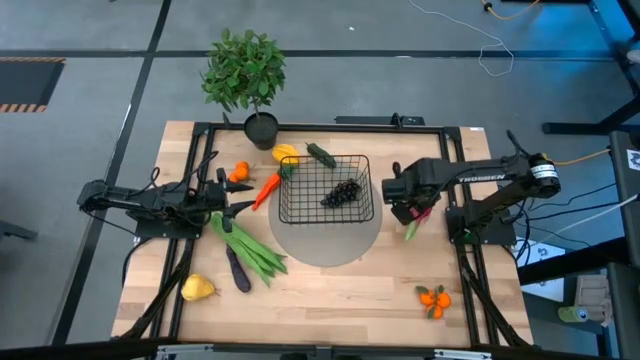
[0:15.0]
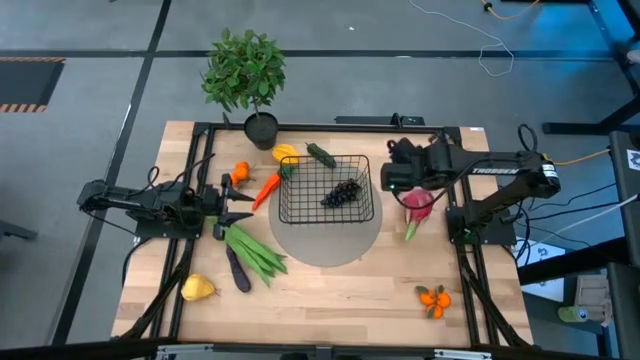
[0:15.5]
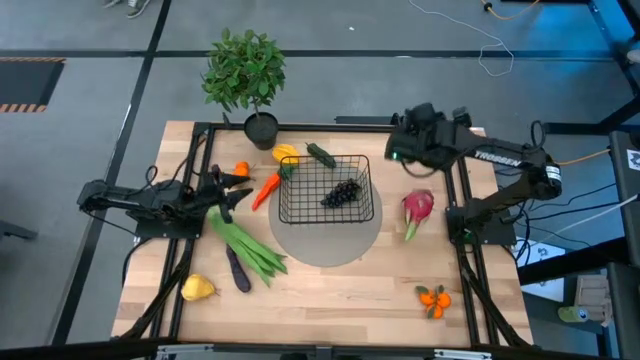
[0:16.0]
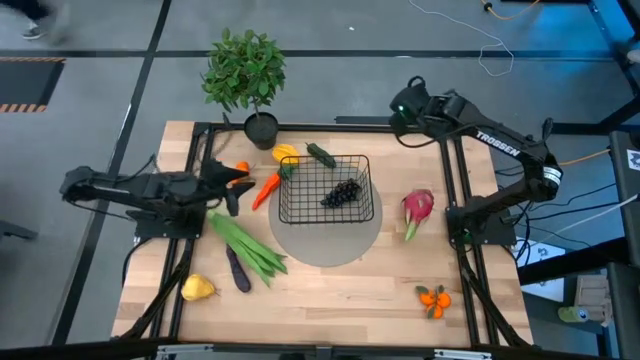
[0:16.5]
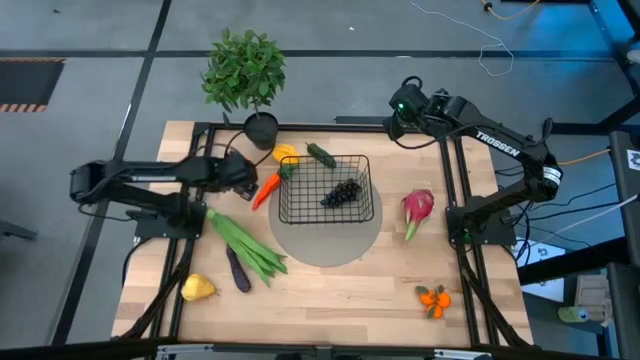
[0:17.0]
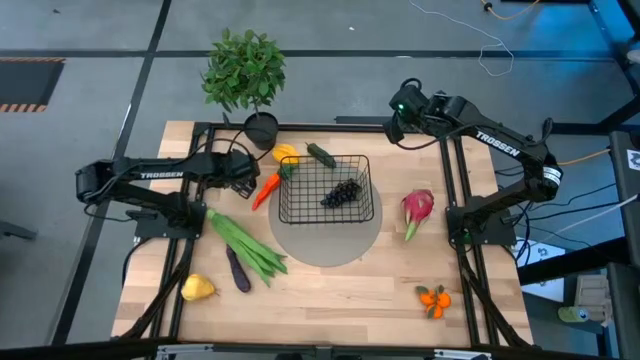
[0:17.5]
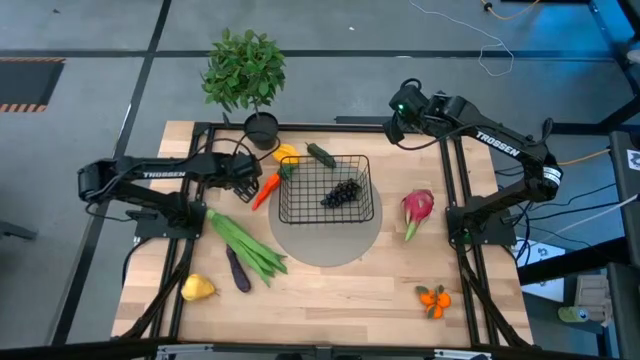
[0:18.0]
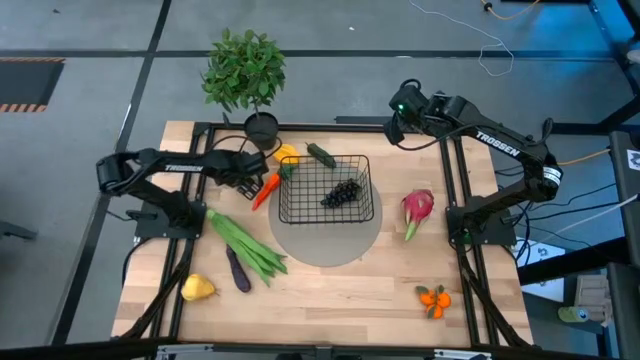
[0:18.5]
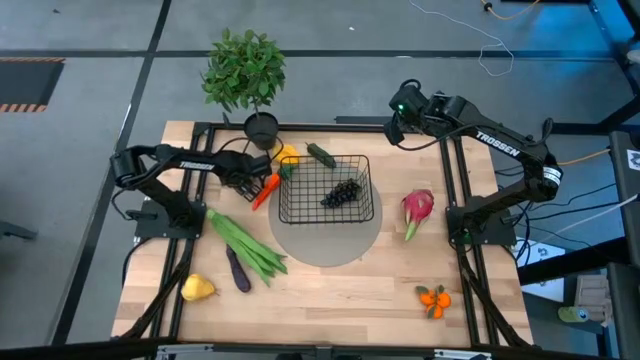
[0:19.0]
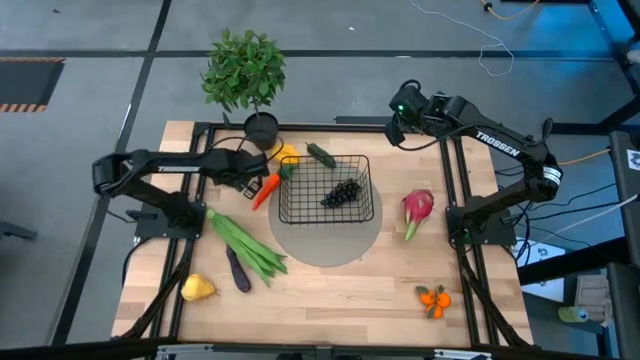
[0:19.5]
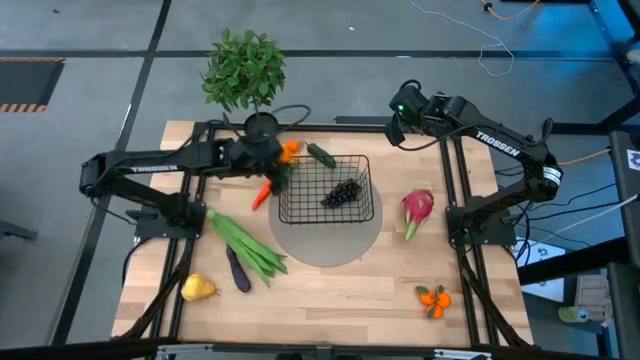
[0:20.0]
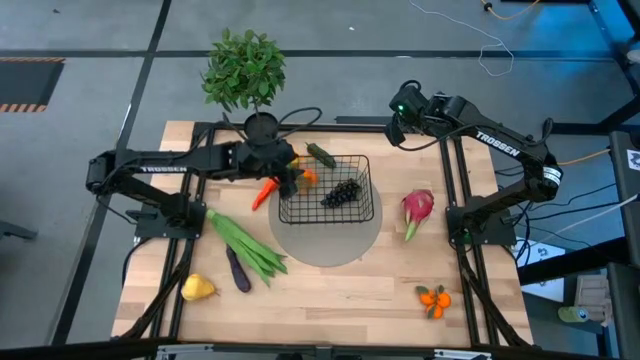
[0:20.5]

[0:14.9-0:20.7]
Task: Build produce basket
Put the top oranges into the black wire basket

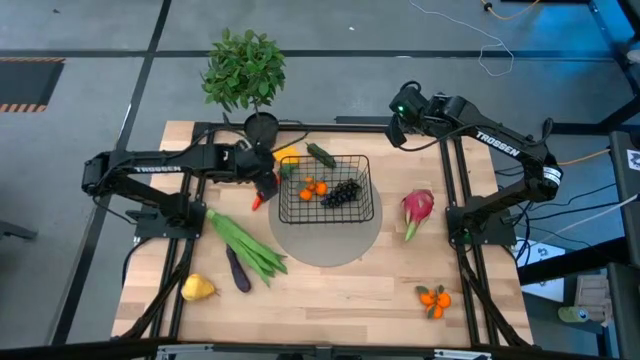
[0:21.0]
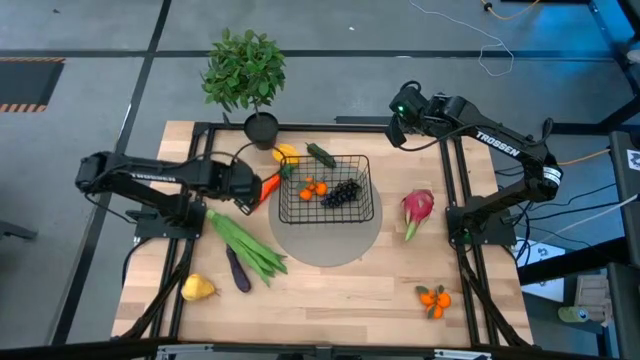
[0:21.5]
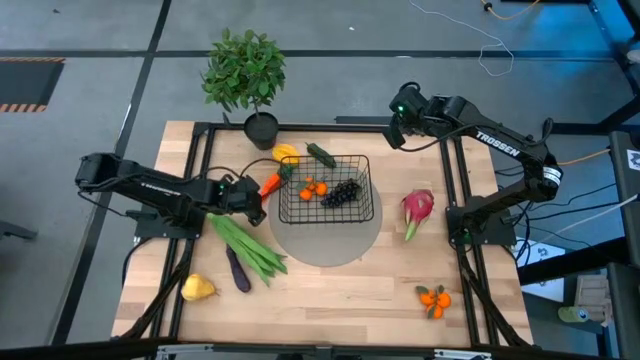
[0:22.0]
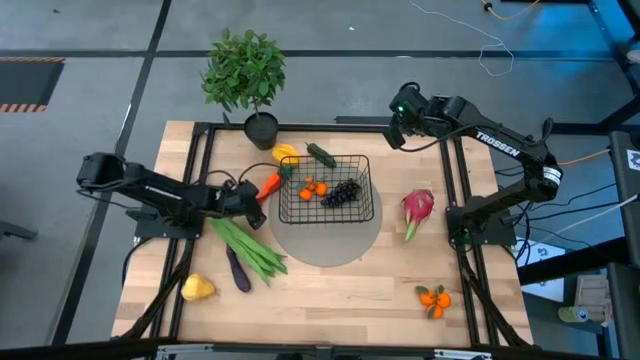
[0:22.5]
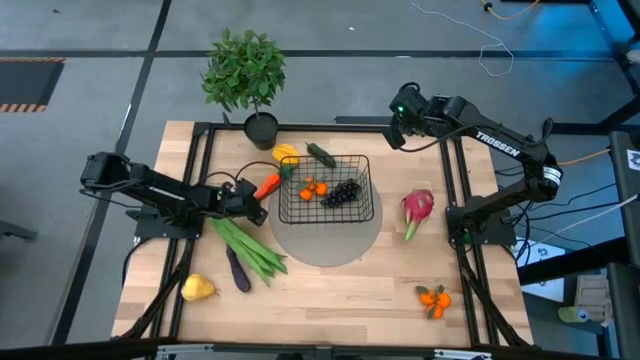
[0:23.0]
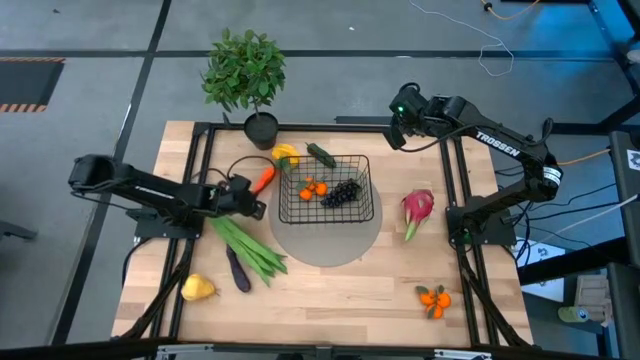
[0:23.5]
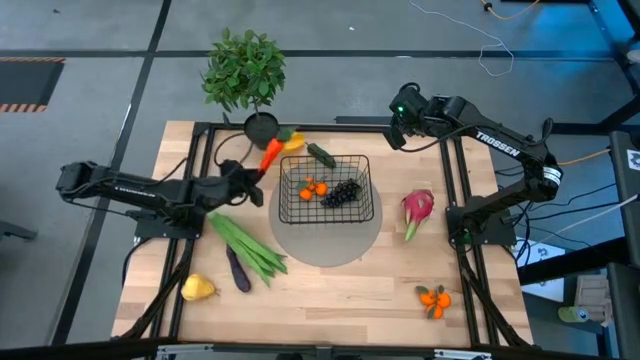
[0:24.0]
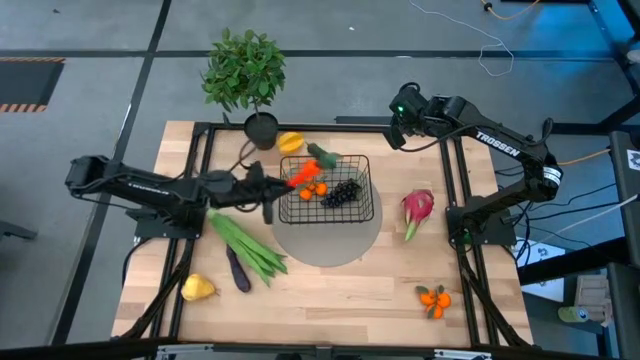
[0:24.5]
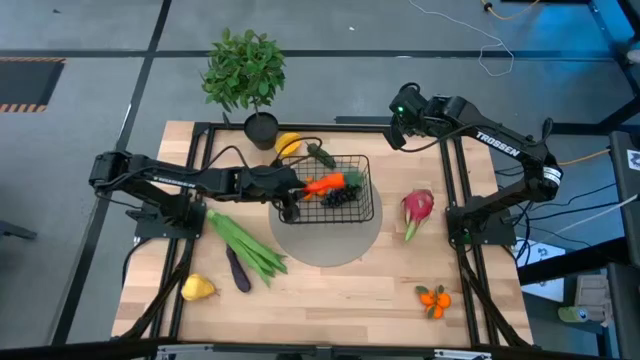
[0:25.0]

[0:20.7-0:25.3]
Put the carrot into the black wire basket

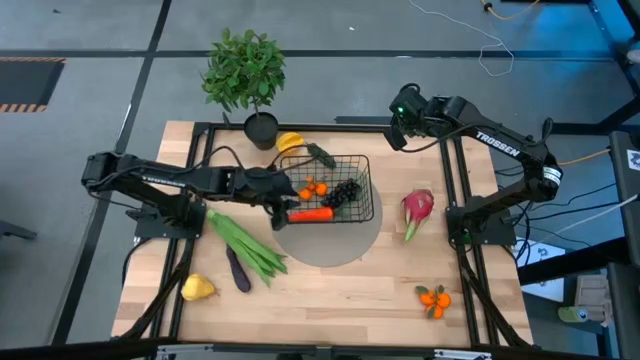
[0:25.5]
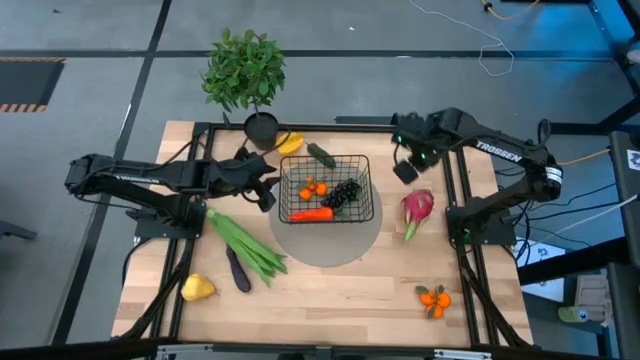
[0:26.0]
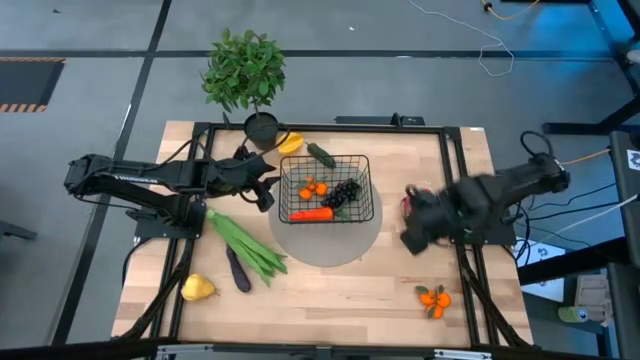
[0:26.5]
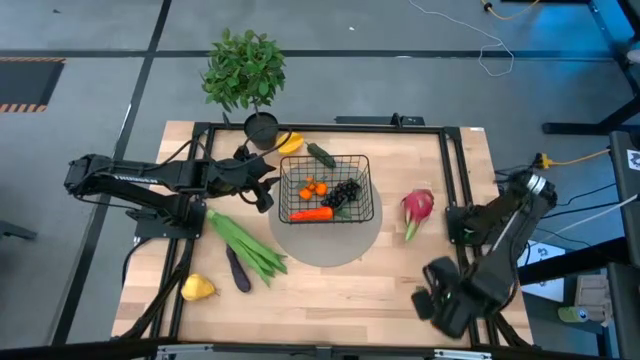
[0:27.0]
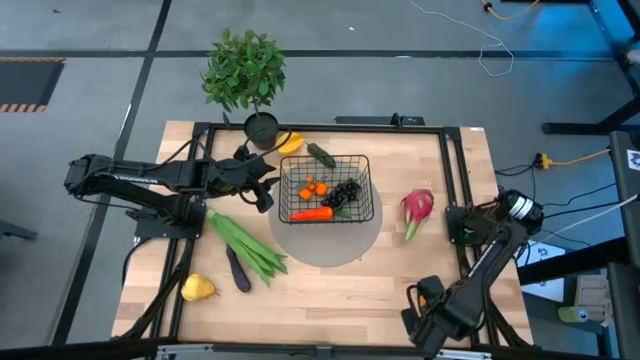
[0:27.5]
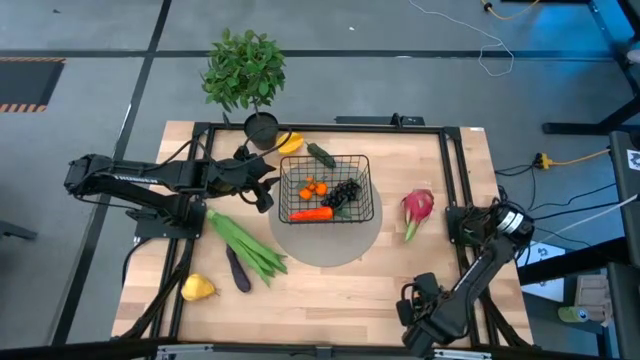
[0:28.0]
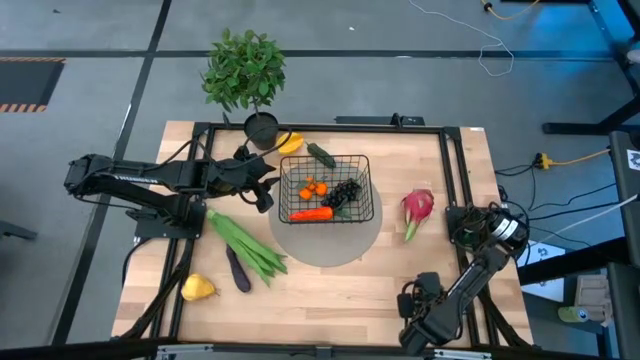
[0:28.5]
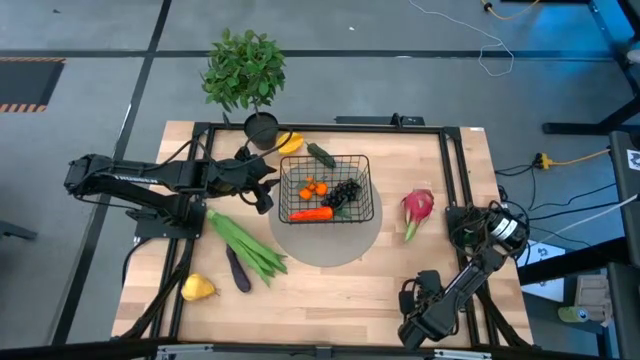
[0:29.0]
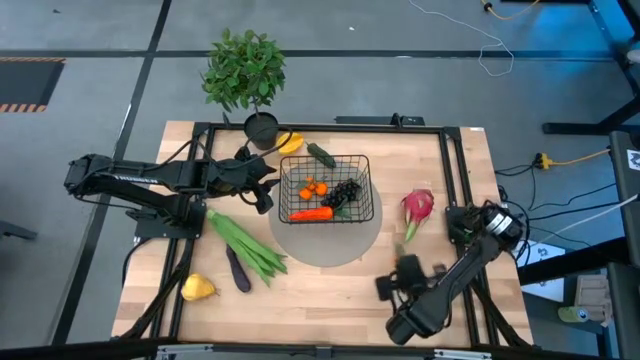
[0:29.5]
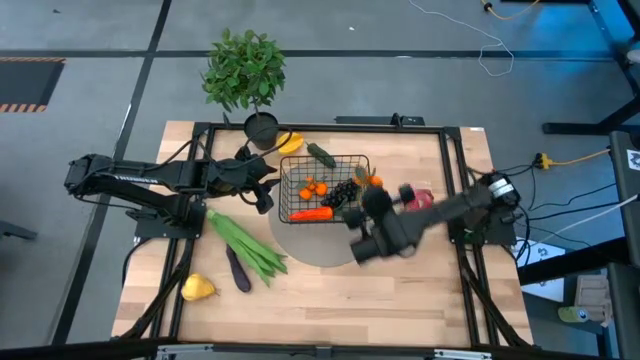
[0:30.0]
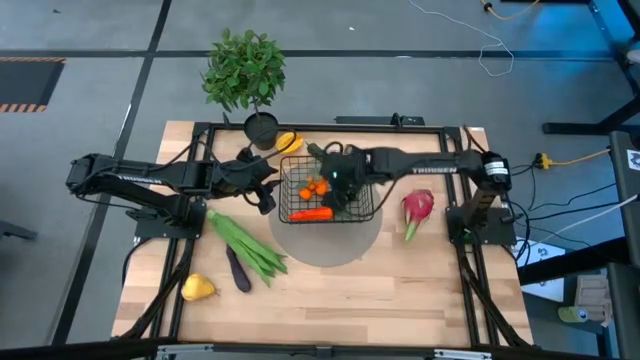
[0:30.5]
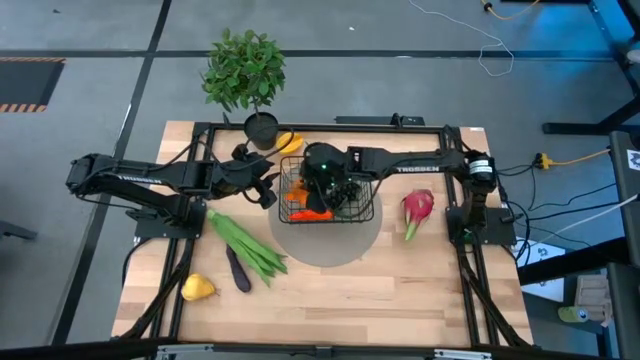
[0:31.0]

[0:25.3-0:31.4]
Put the oranges into the black wire basket

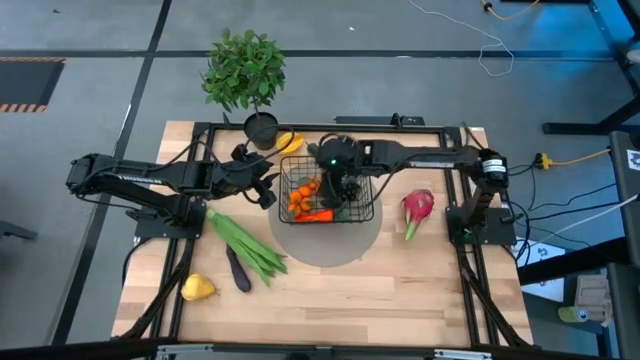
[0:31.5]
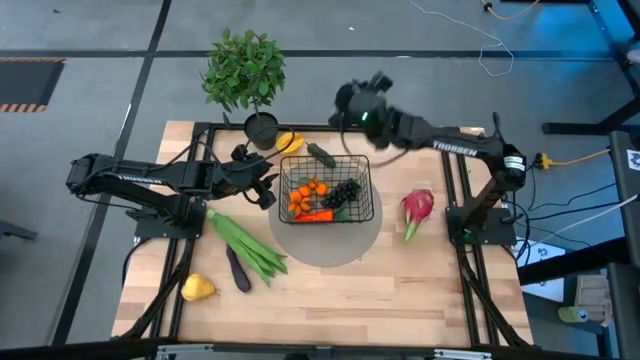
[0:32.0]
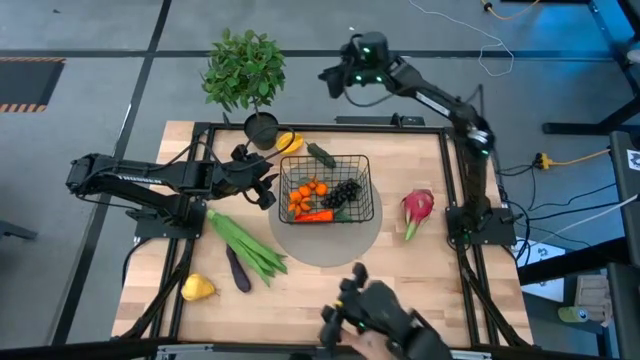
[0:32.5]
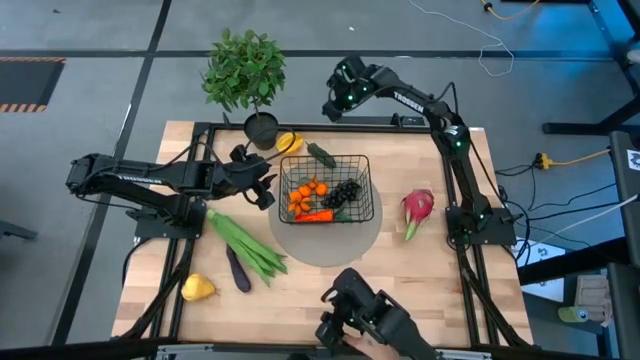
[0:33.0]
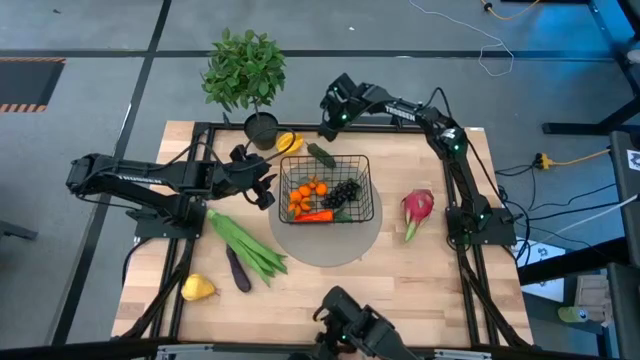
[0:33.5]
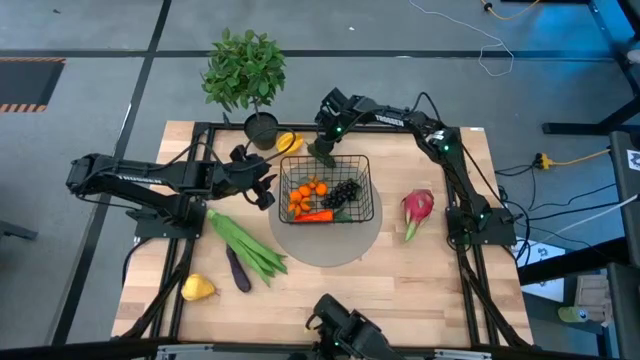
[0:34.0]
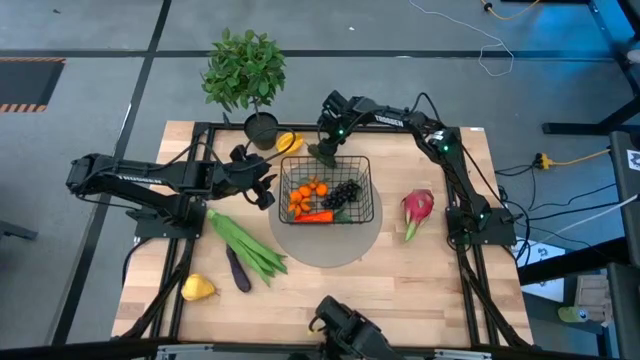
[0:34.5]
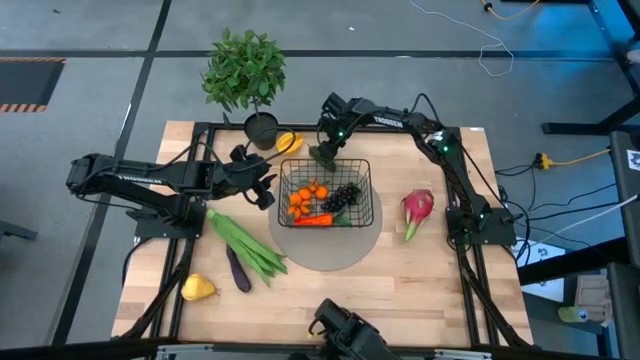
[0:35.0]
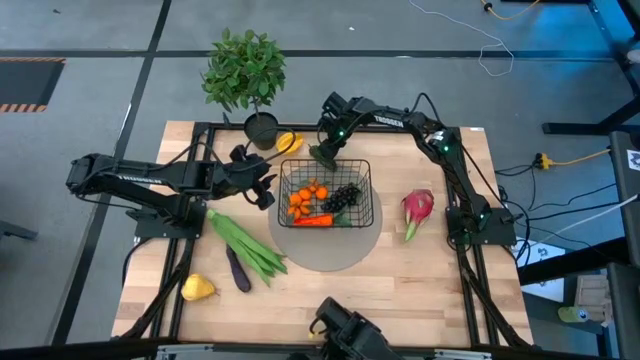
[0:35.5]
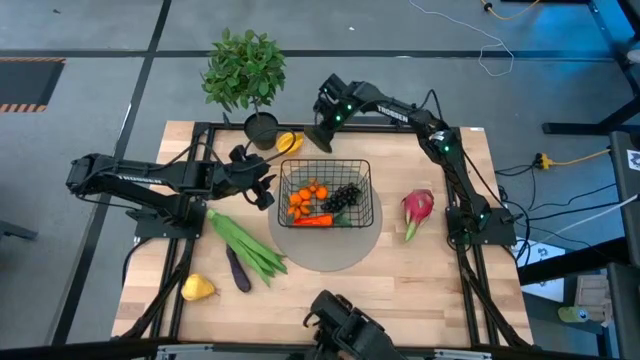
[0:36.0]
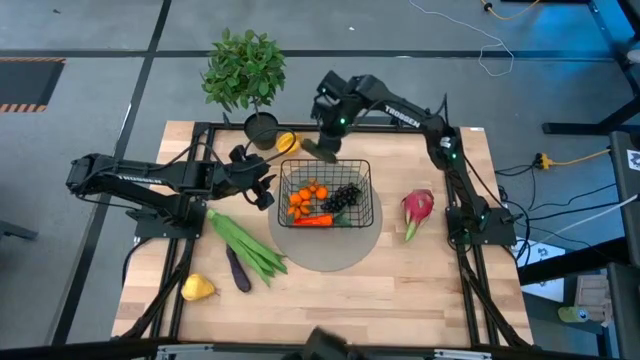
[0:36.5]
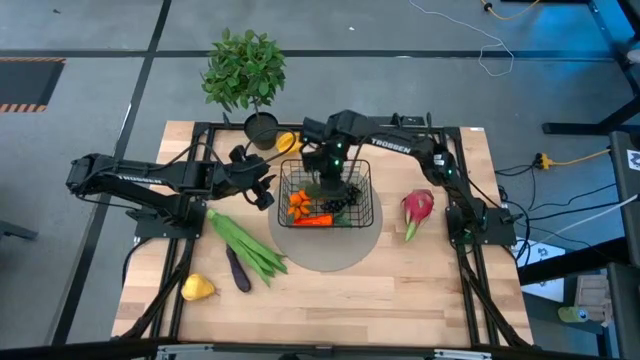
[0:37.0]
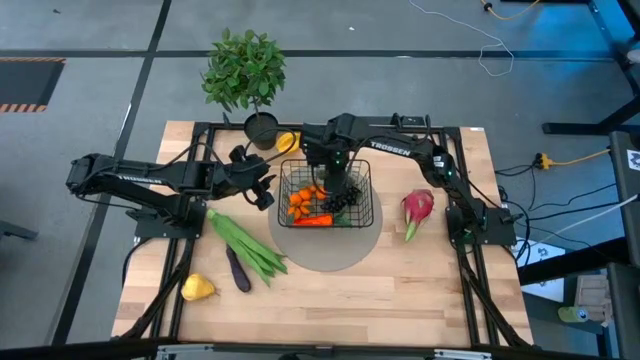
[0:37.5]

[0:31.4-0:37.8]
Put the bell pepper into the black wire basket
